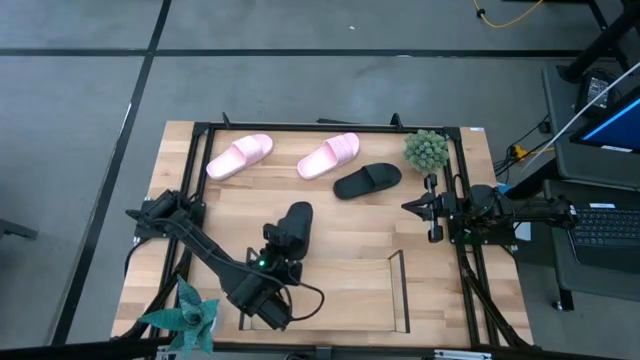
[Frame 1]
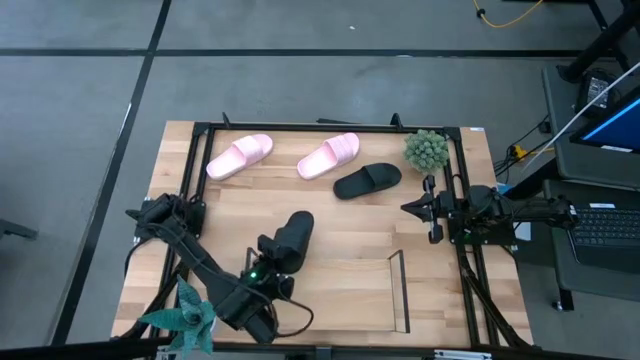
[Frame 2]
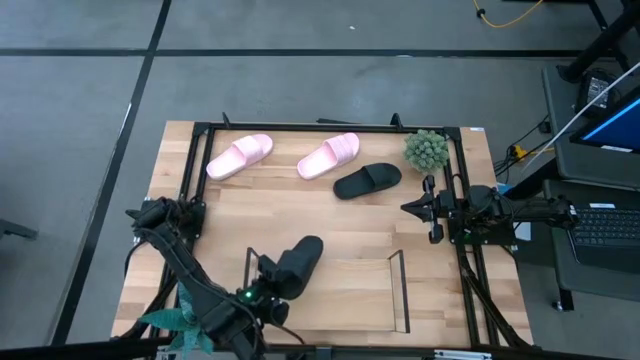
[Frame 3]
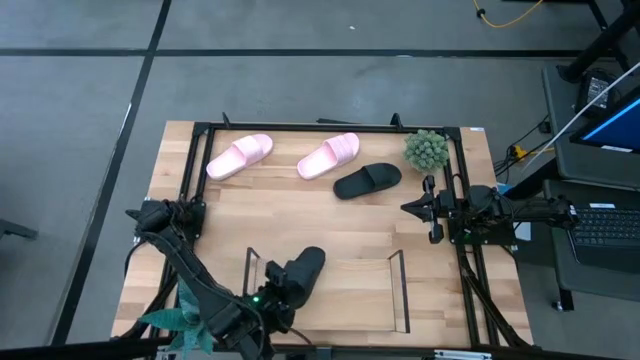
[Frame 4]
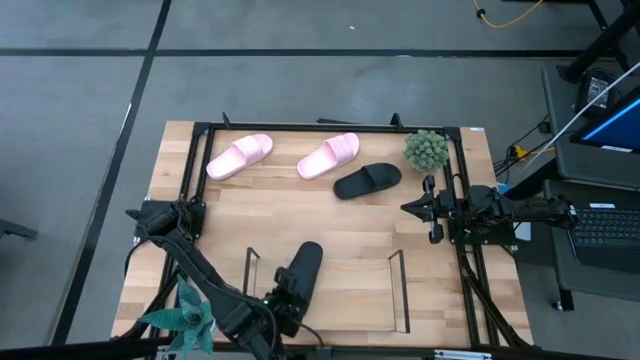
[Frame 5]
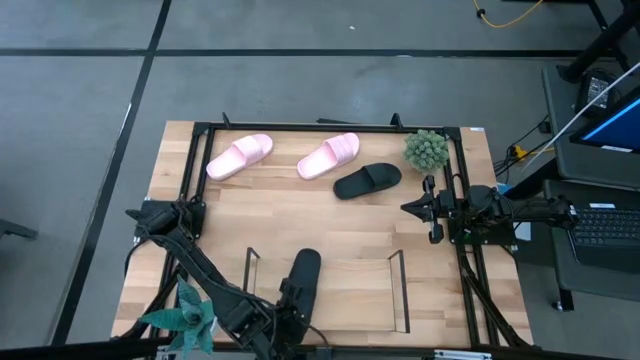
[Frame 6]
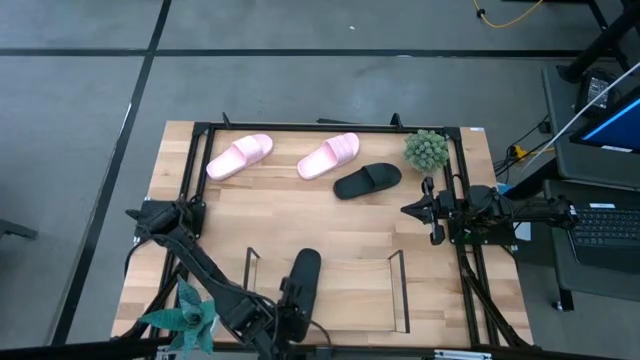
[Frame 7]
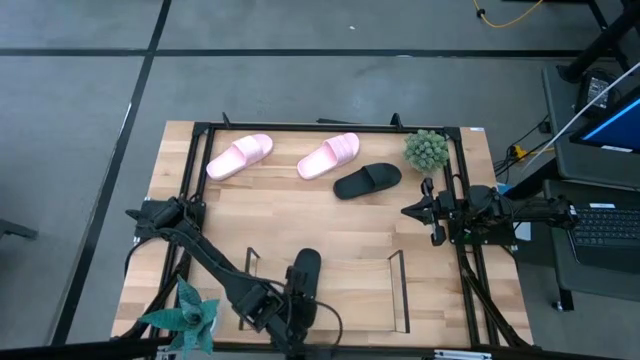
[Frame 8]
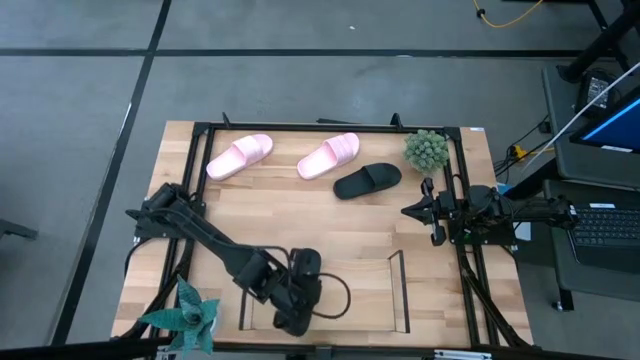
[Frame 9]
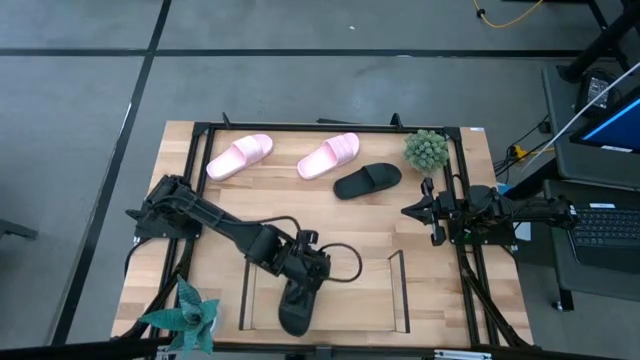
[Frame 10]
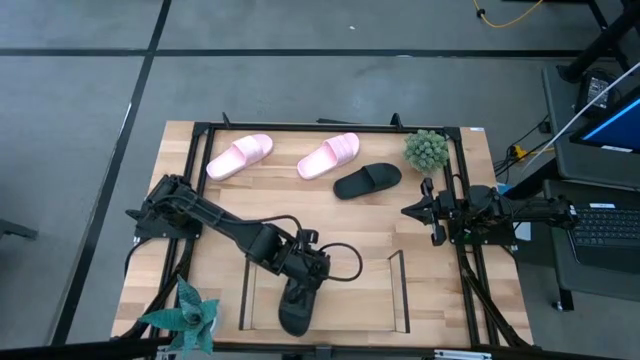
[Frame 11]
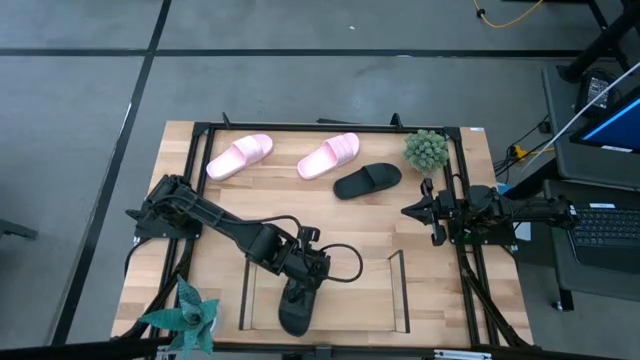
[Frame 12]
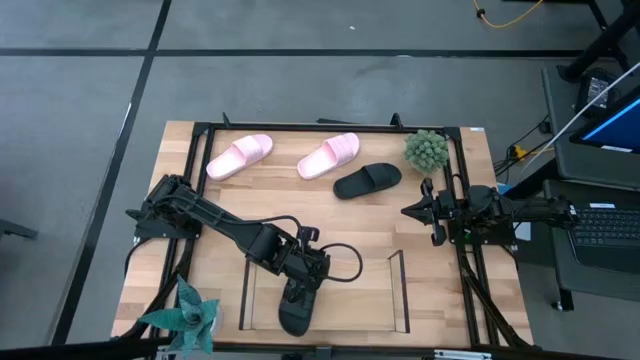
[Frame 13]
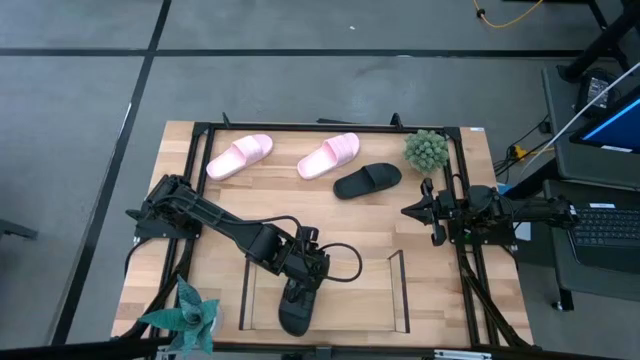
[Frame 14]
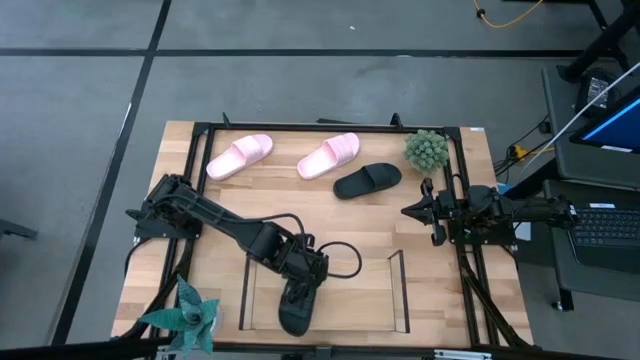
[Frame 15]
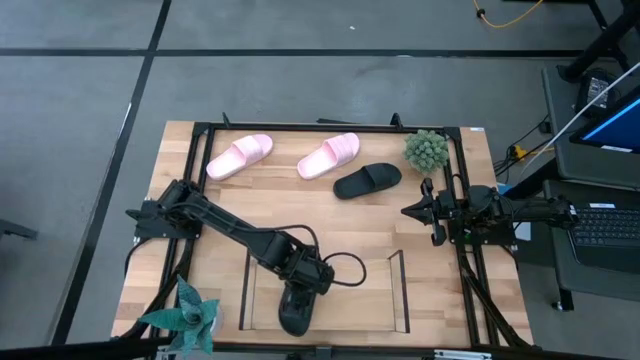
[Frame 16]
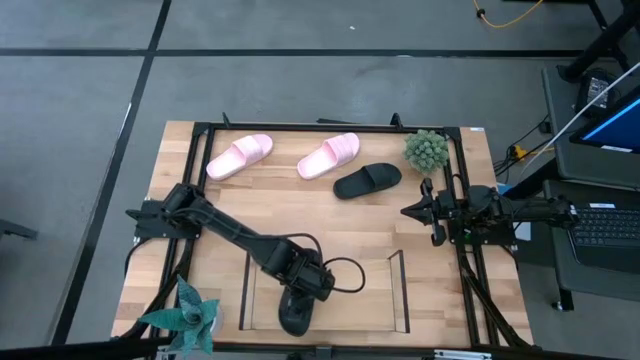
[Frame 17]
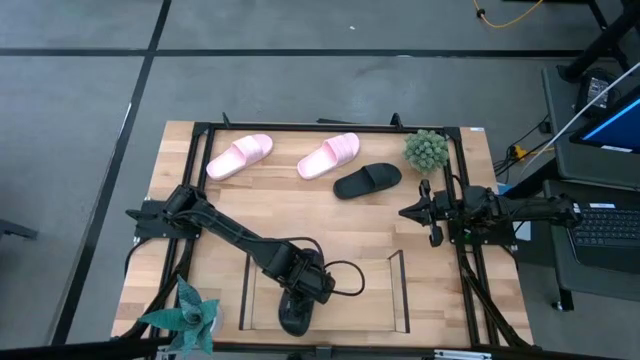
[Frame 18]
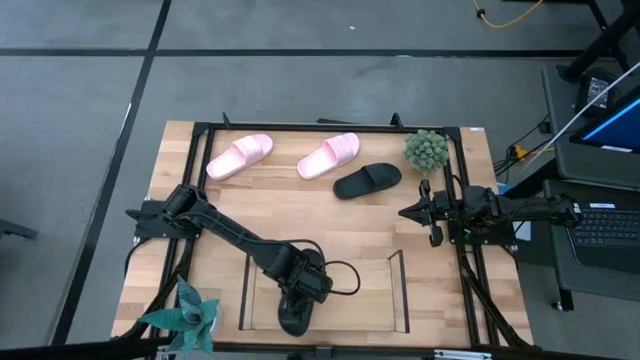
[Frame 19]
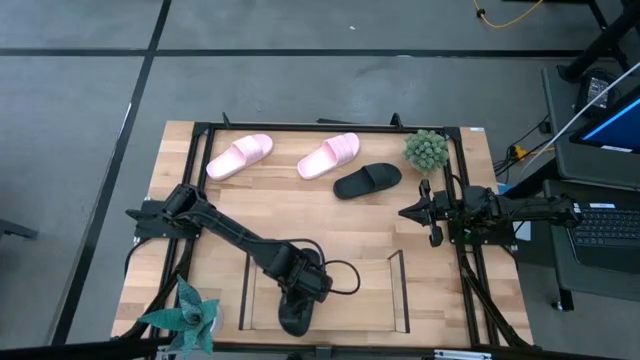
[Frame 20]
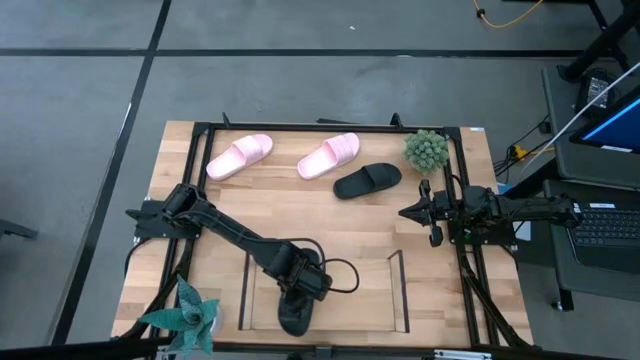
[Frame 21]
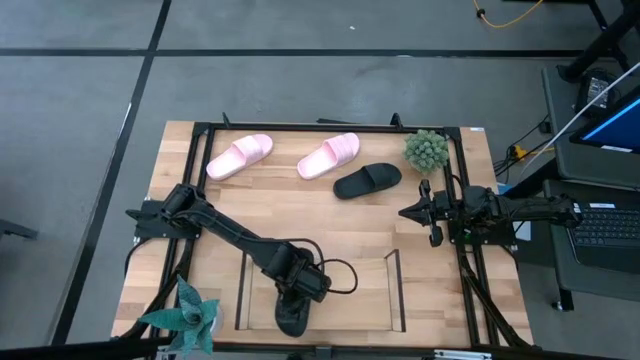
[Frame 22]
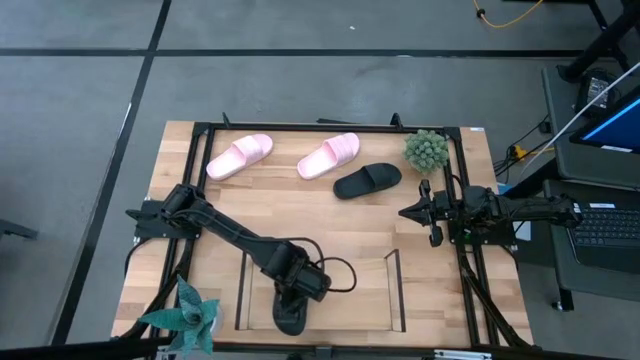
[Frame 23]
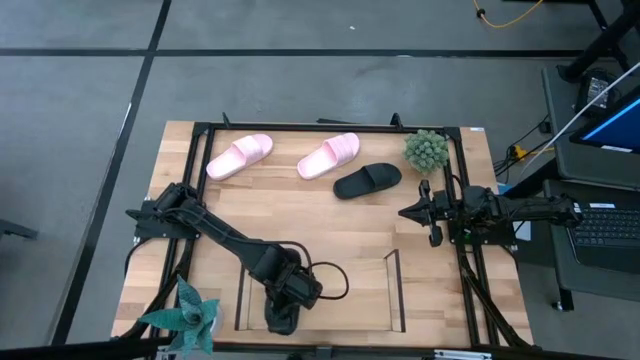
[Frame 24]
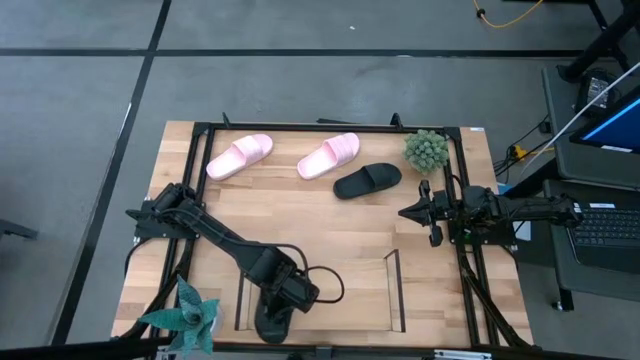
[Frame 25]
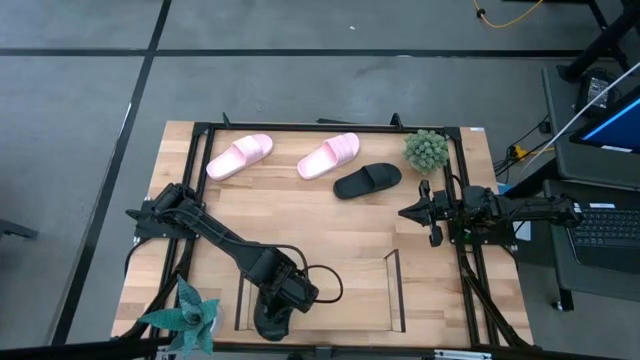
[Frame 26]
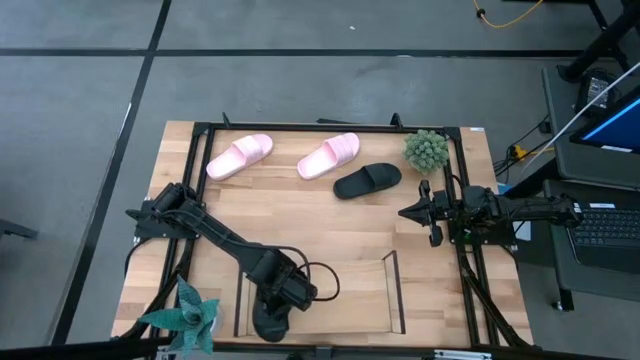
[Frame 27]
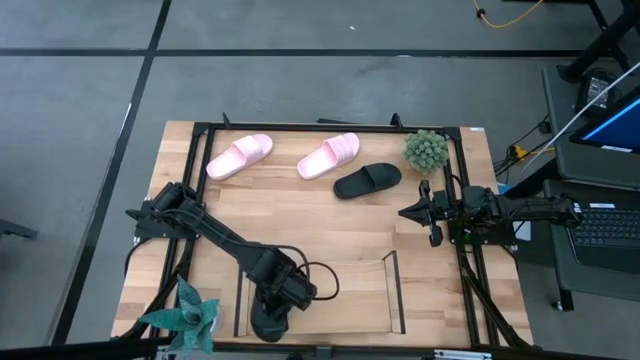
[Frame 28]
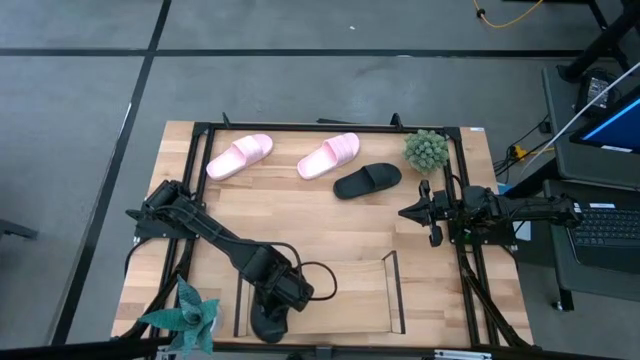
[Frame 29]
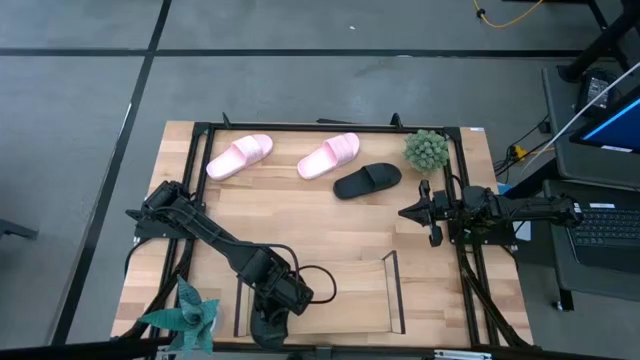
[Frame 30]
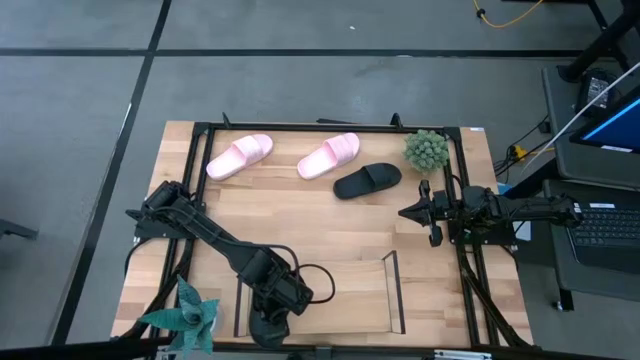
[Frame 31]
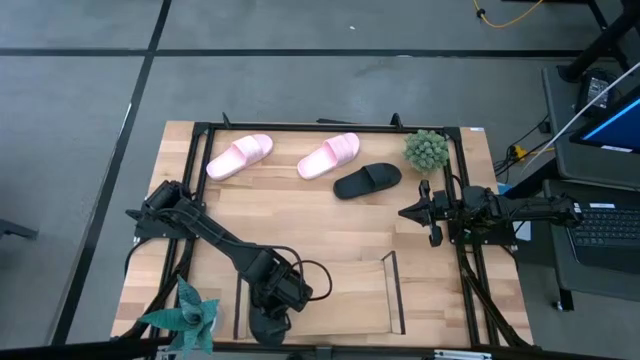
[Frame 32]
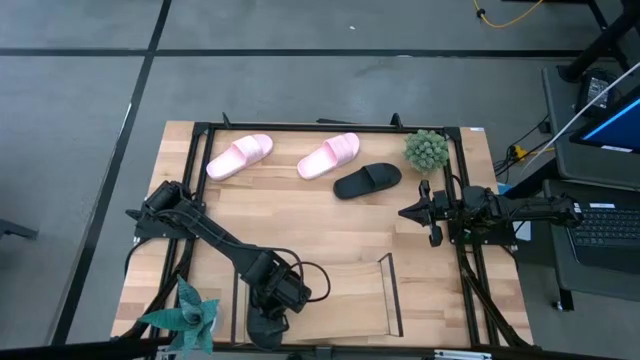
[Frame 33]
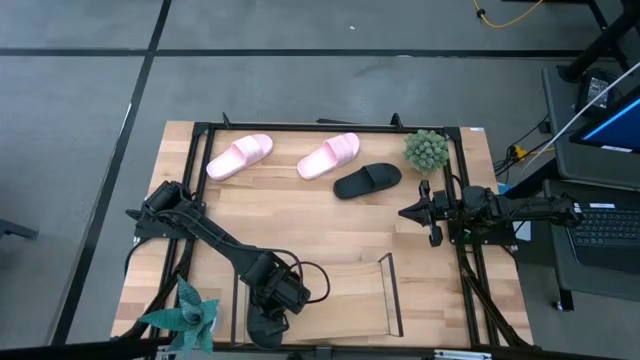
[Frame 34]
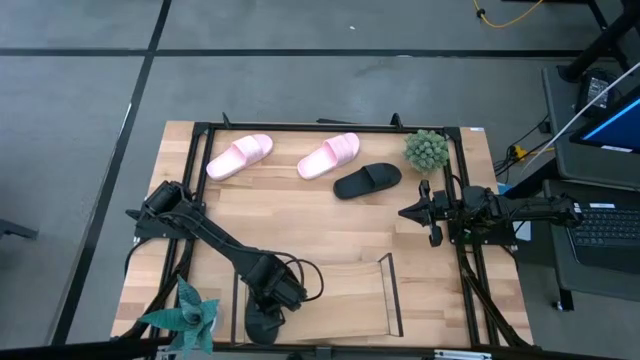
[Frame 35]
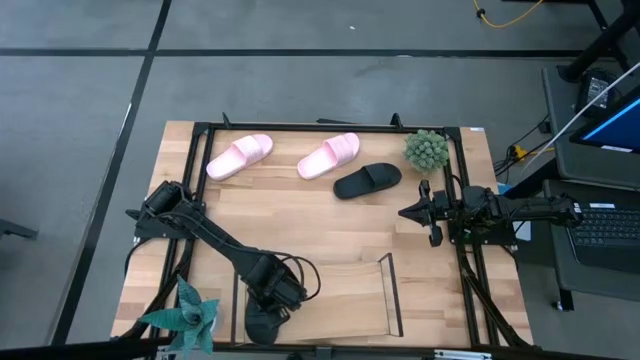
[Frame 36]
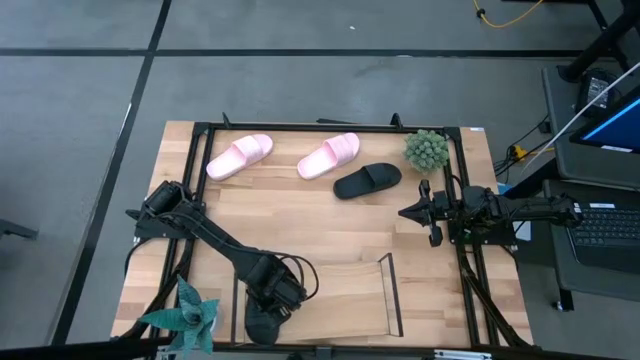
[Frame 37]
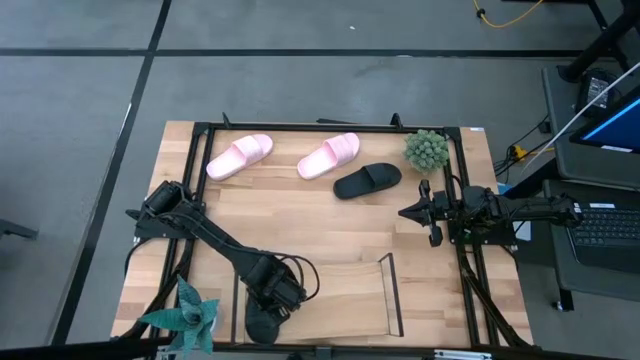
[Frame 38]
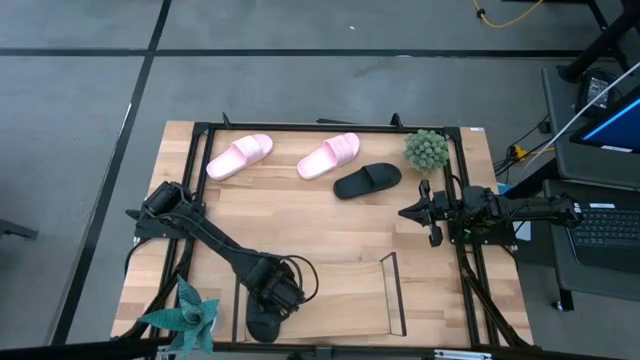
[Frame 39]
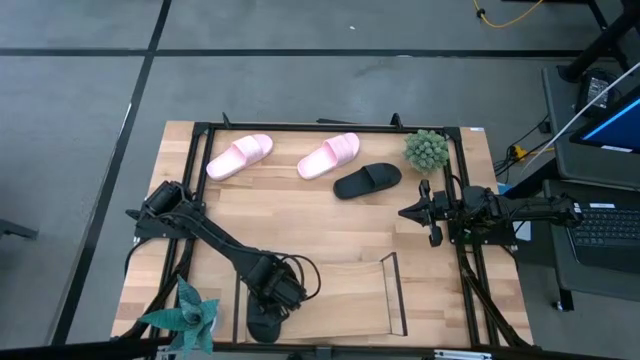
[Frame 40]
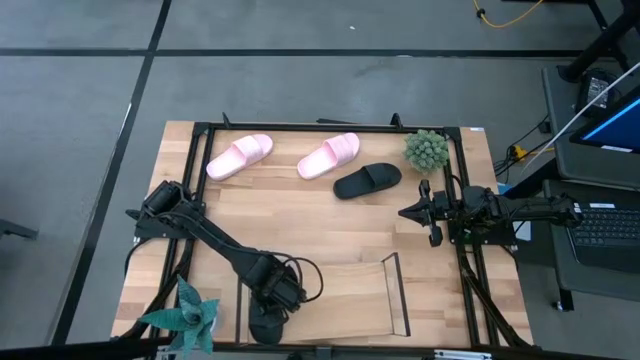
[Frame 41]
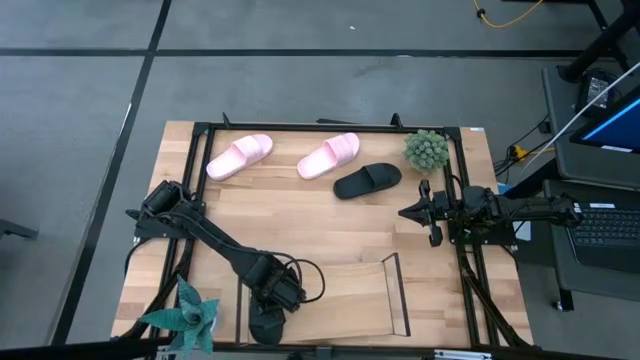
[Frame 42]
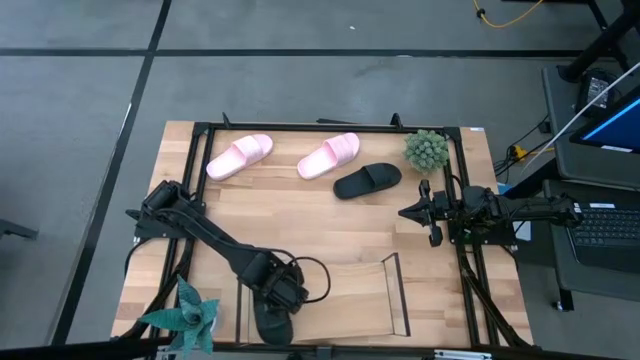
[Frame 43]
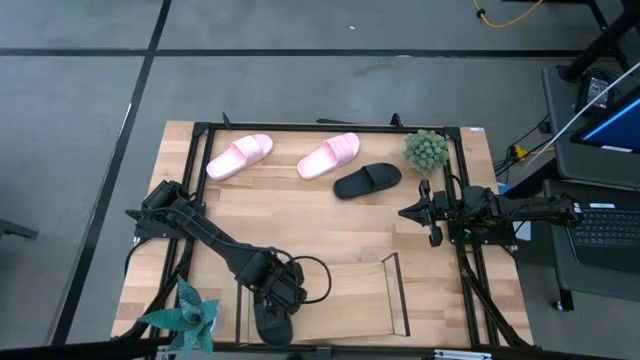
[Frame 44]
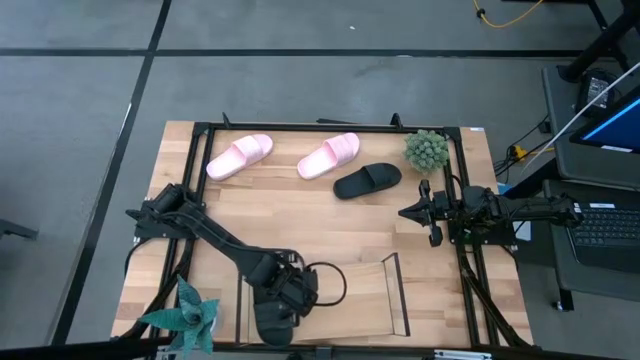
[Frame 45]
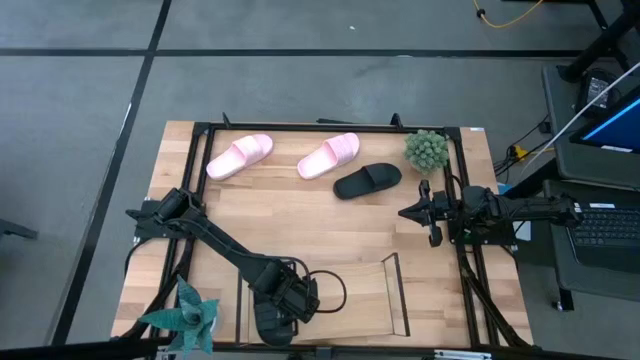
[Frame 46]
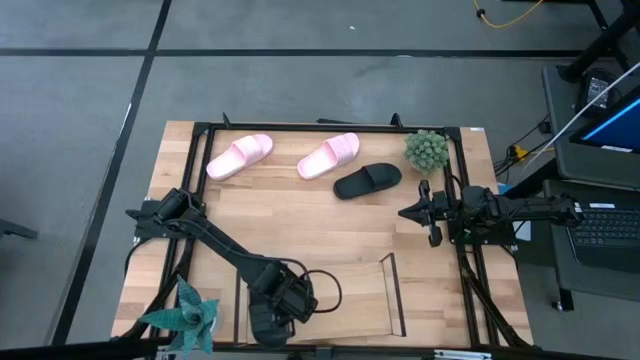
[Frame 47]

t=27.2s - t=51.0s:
Task: Pick and place slides into the shelf
Put the left black slide on the shelf
